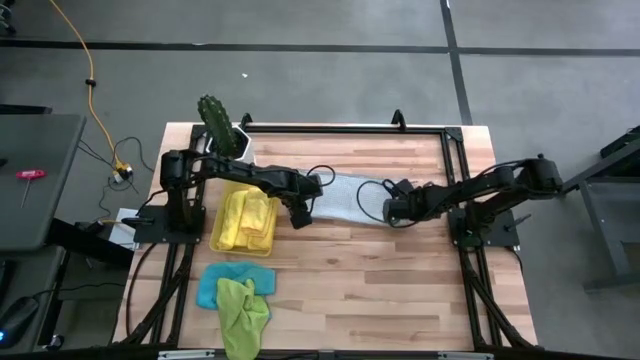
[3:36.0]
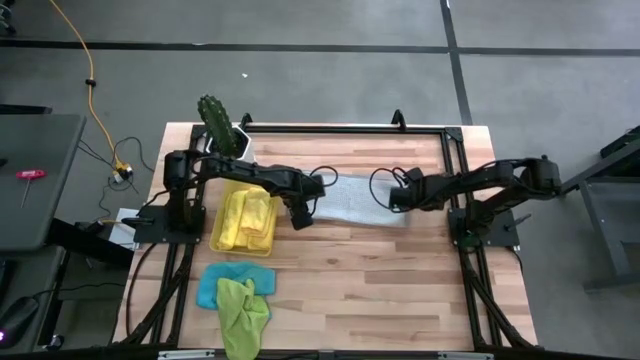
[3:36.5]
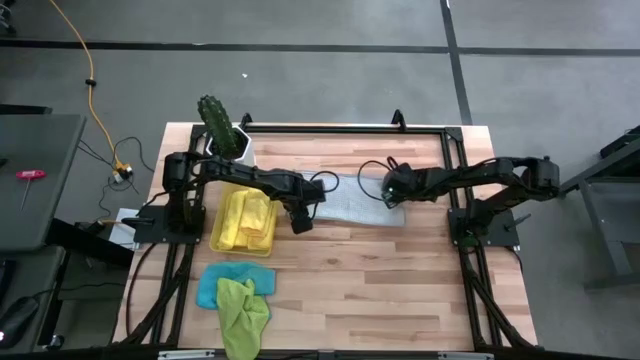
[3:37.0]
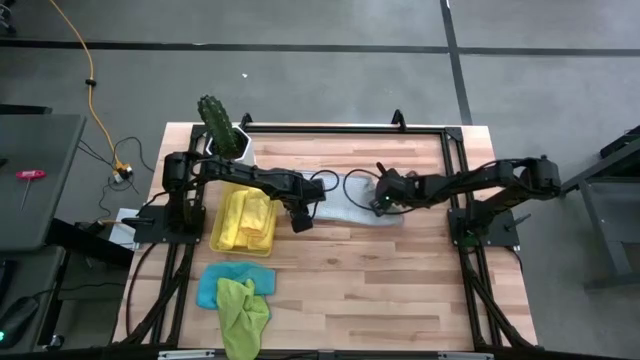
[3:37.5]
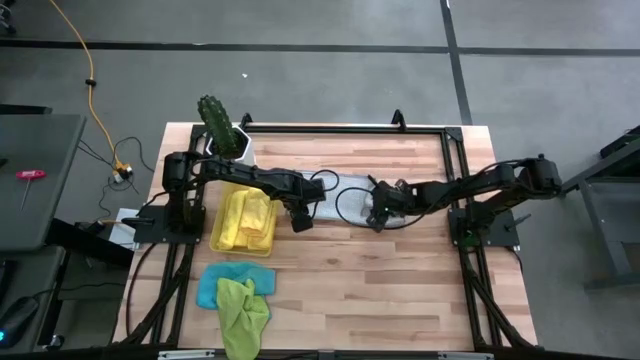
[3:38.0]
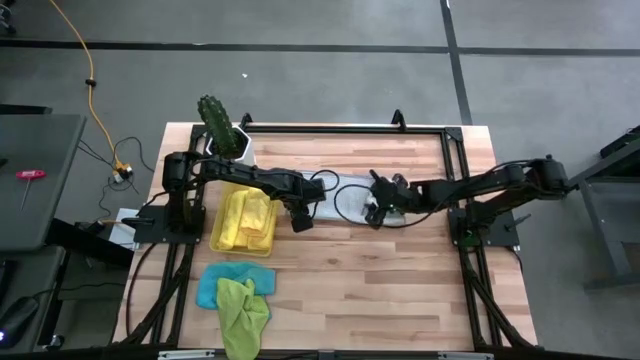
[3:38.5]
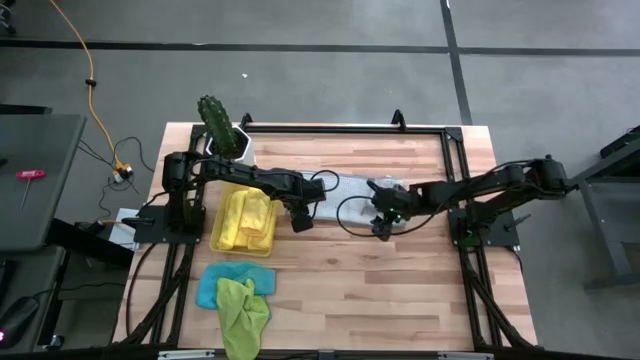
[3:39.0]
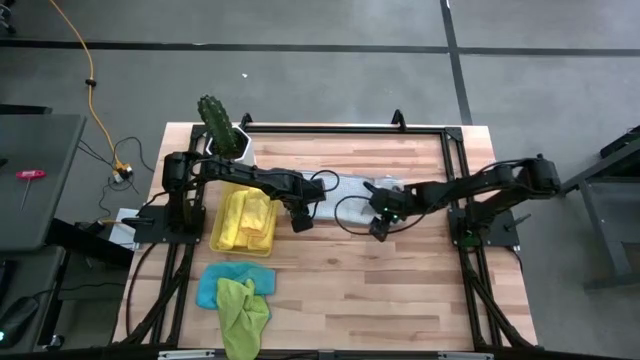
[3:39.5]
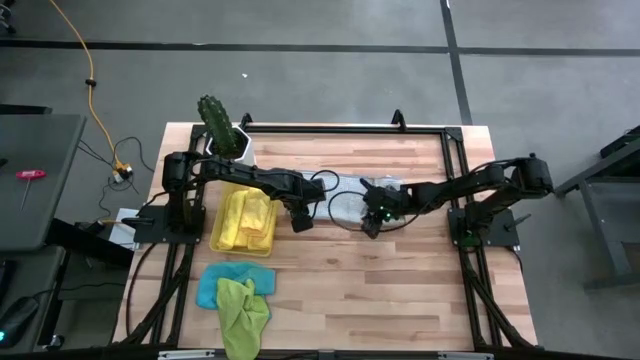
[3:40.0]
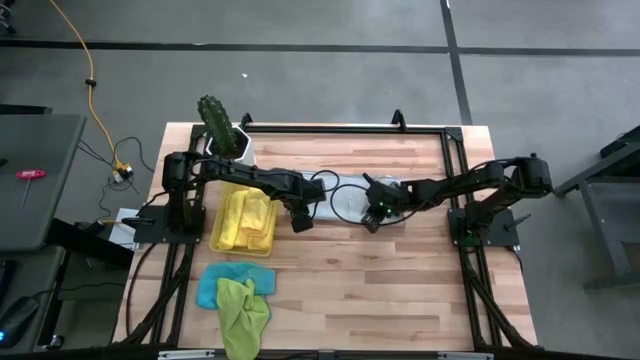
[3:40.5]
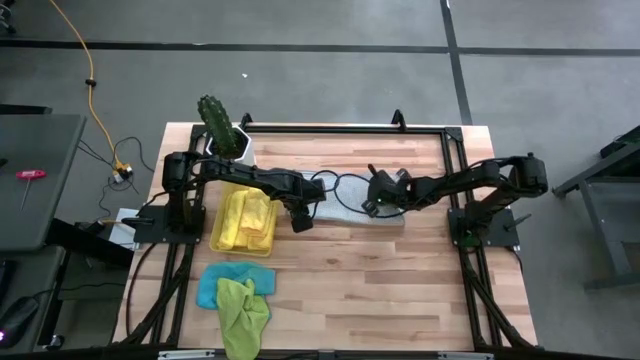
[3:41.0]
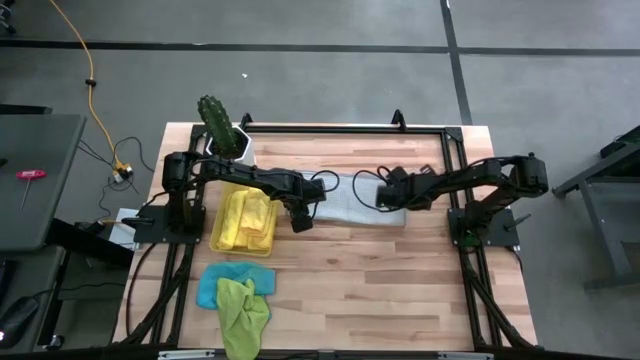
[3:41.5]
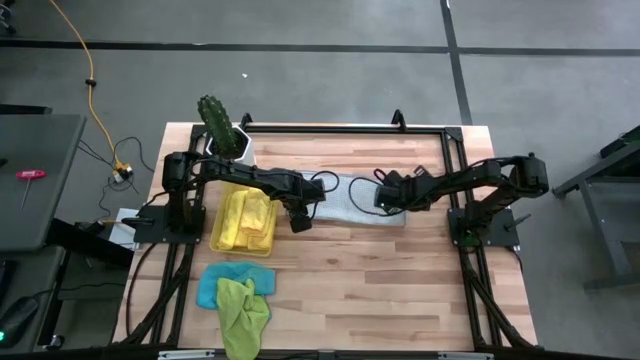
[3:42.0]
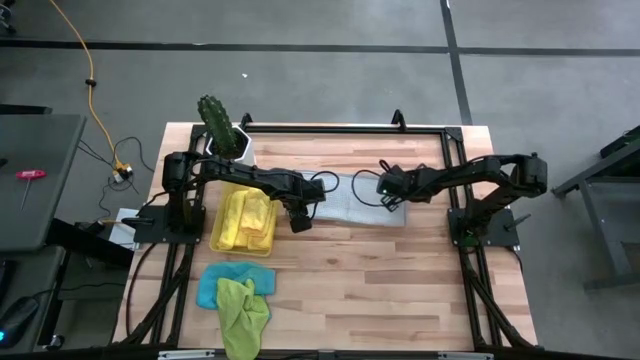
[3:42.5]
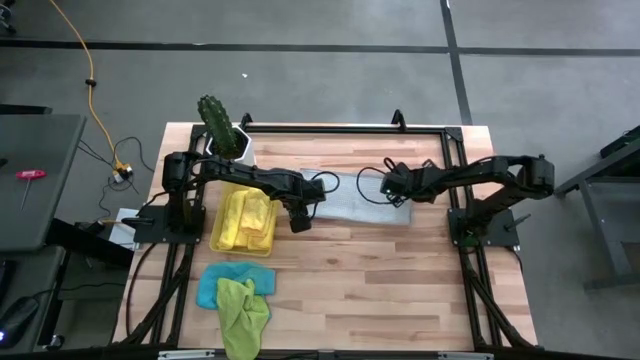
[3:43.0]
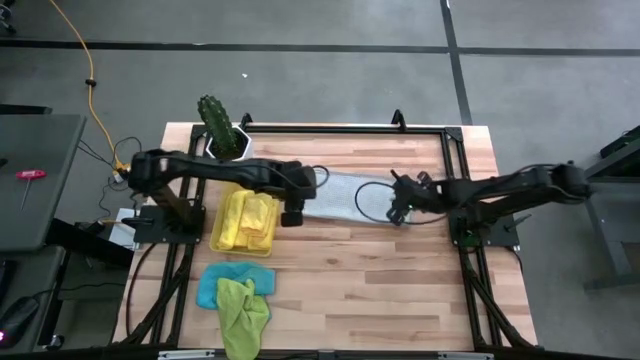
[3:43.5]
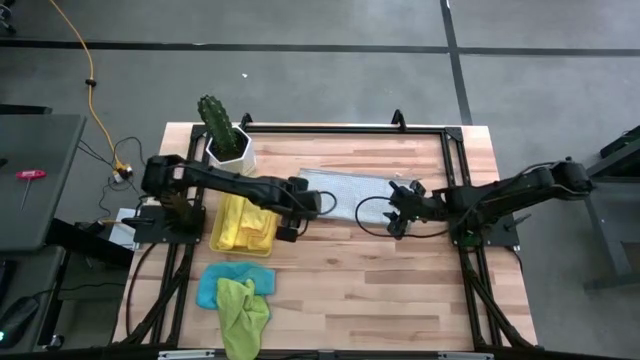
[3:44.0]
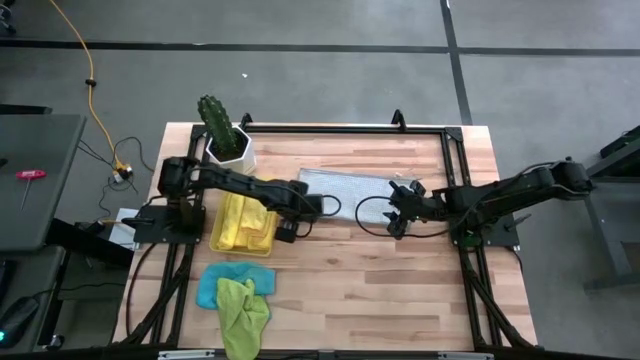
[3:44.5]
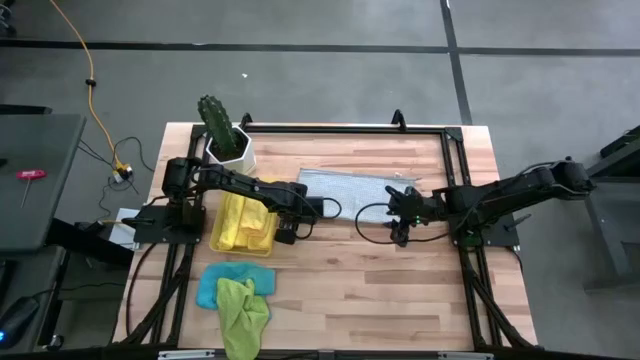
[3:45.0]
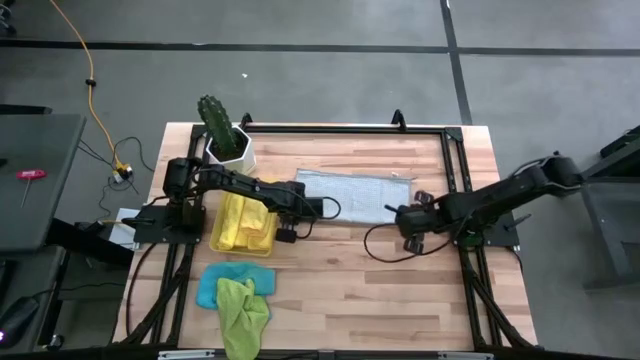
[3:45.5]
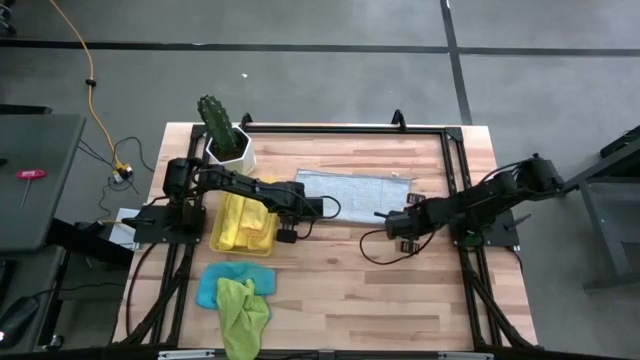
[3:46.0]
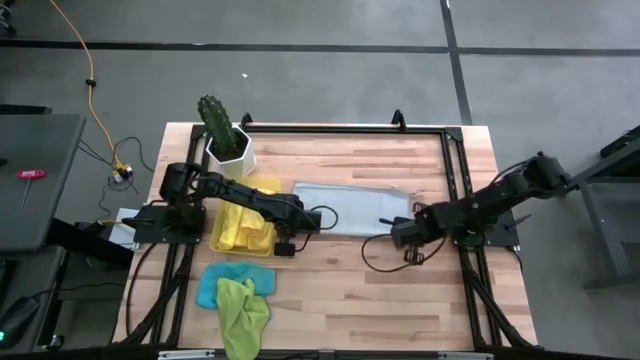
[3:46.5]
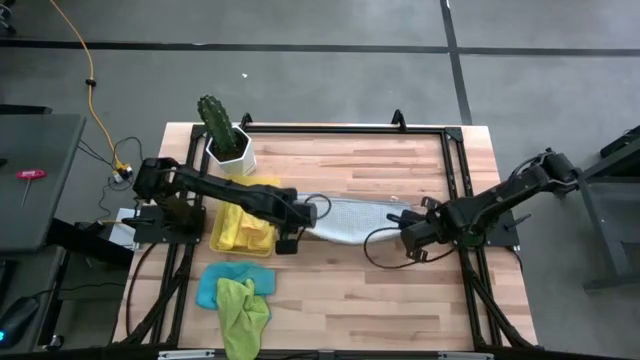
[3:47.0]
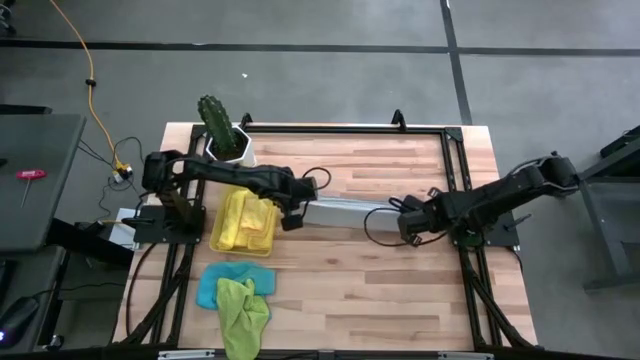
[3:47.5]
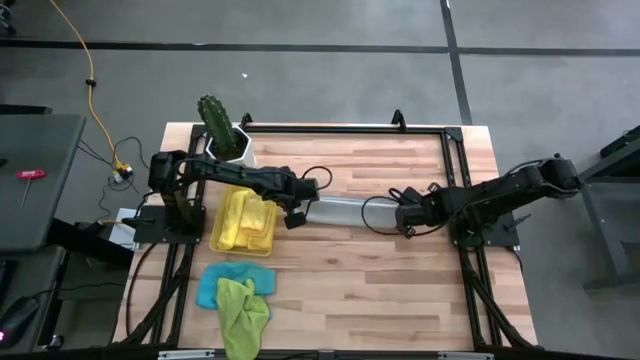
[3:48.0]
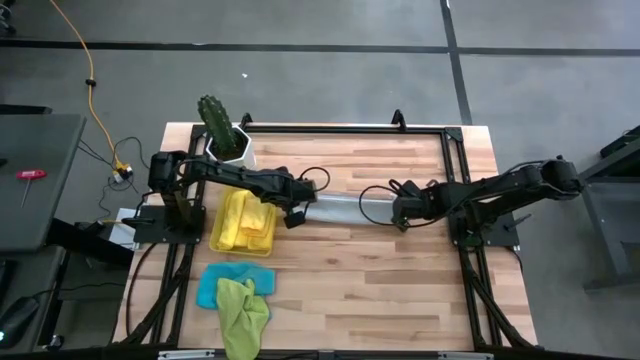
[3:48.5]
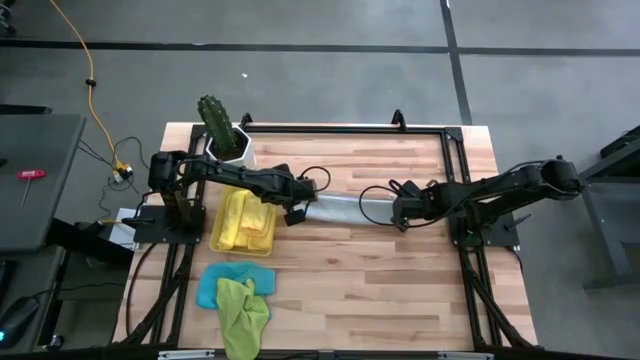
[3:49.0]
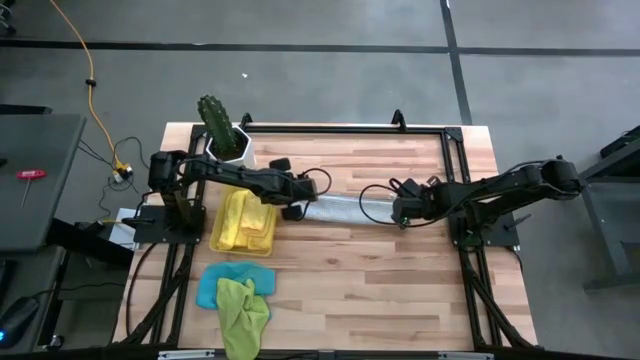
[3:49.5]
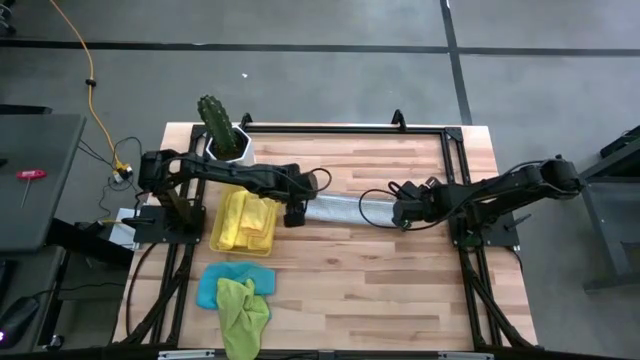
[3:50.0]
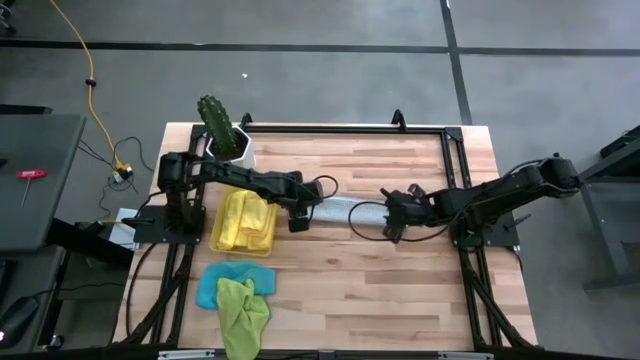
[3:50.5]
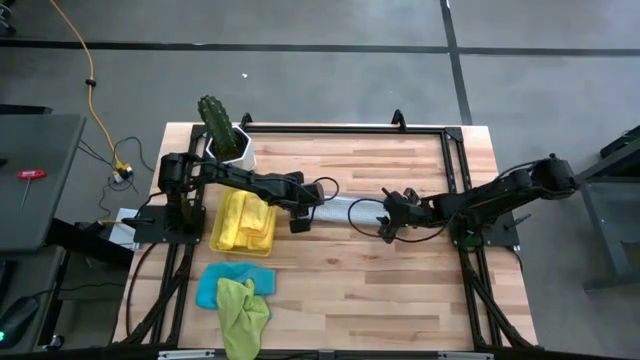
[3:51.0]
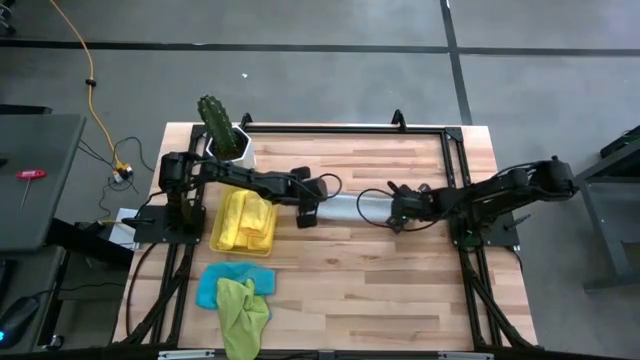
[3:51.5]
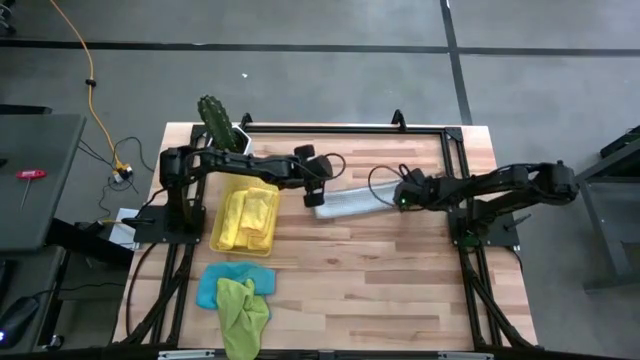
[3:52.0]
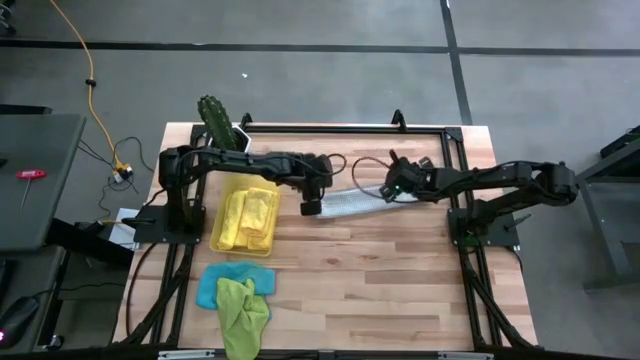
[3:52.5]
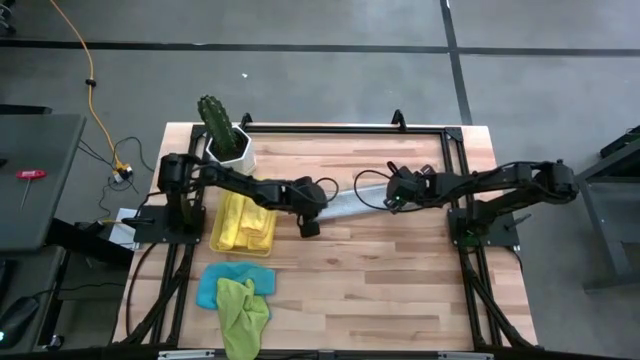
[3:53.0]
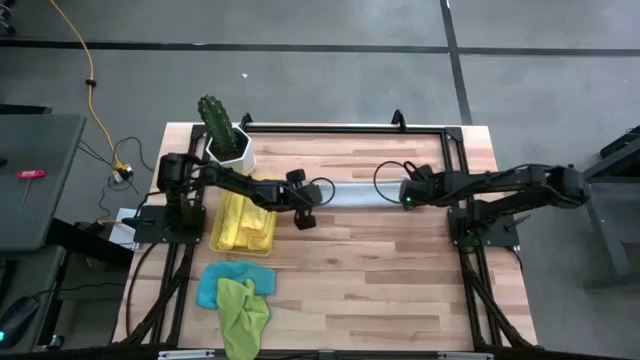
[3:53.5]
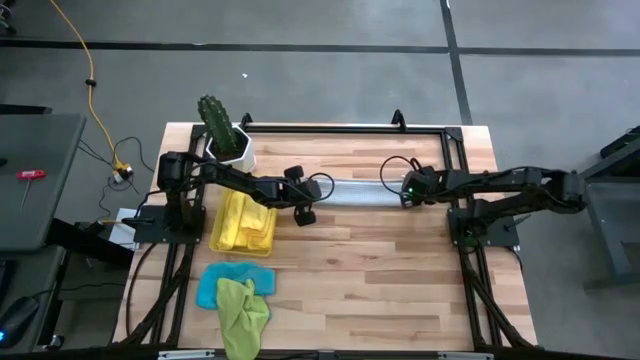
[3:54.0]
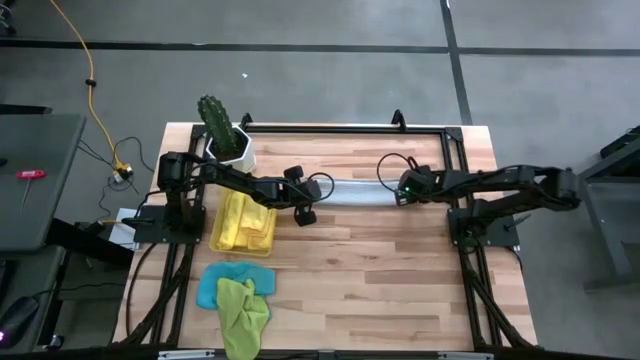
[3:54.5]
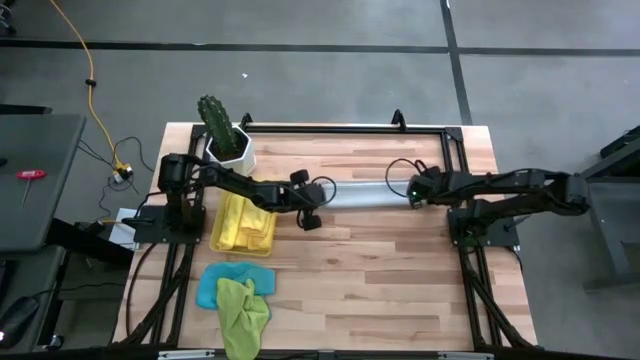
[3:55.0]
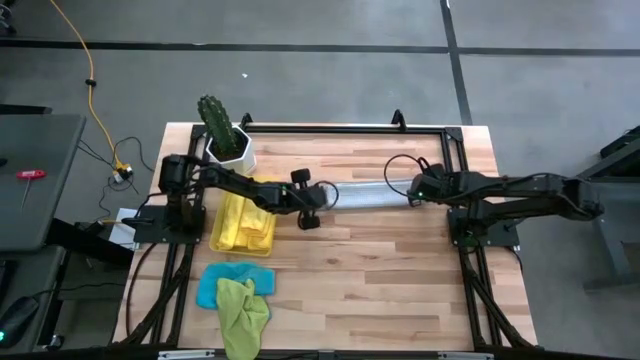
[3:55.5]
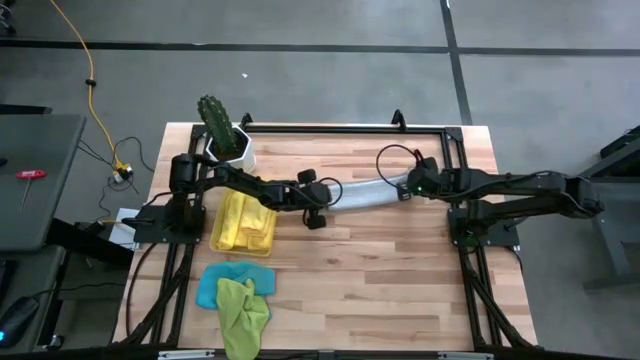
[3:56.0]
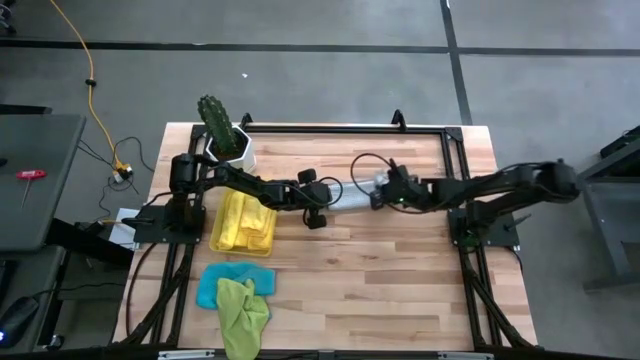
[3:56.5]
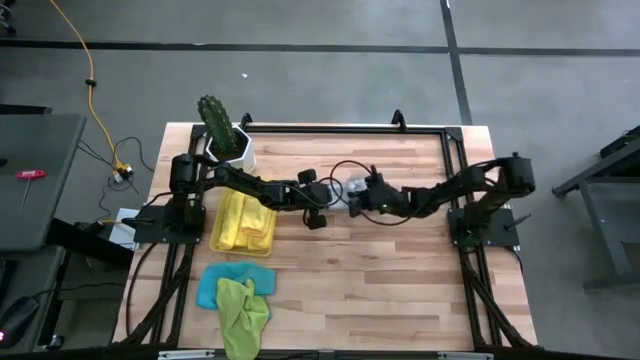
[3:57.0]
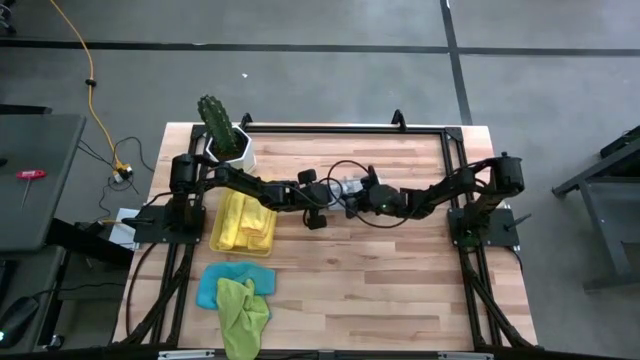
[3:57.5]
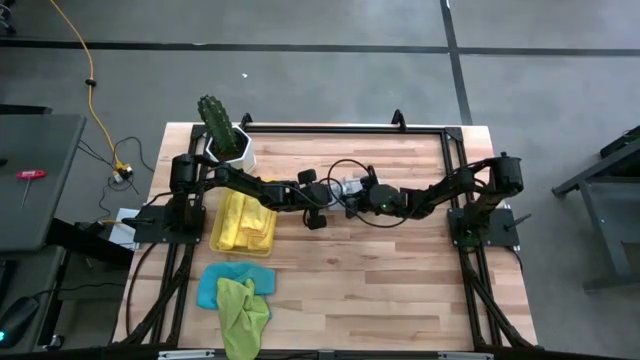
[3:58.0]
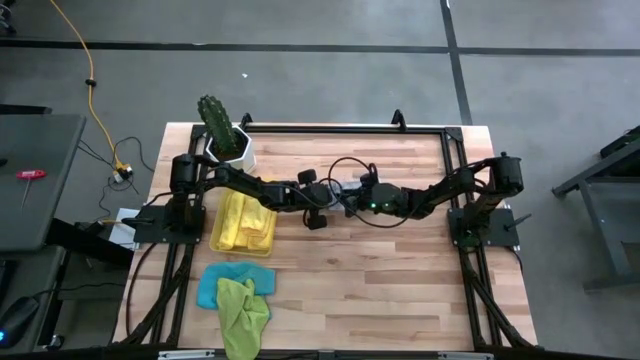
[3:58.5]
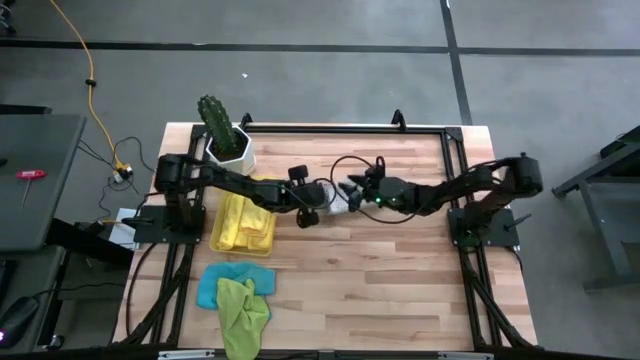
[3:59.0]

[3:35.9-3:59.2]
Task: Fold microfiber towels
Fold the gray microfiber towel
